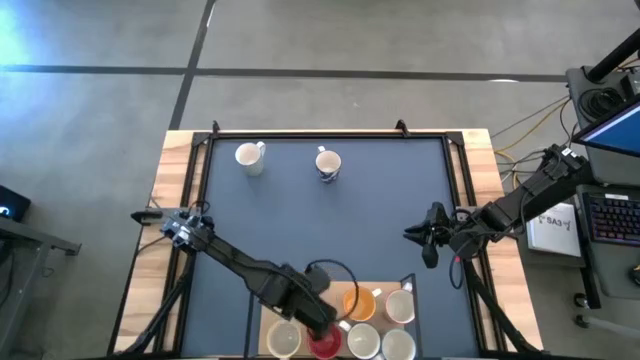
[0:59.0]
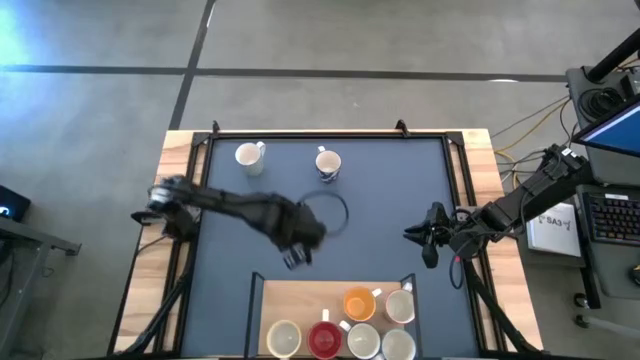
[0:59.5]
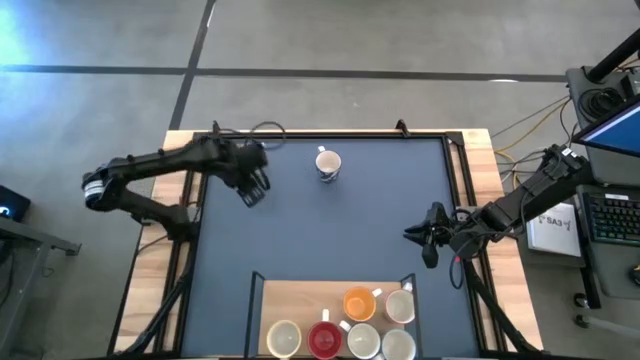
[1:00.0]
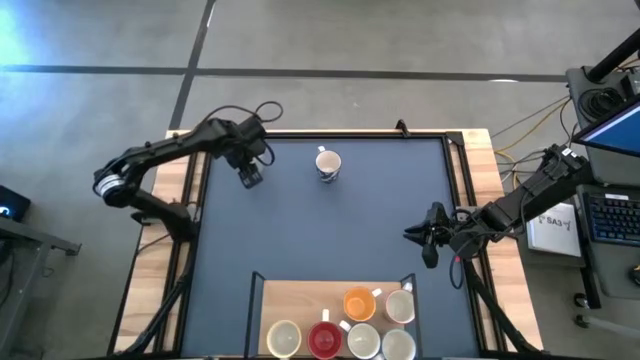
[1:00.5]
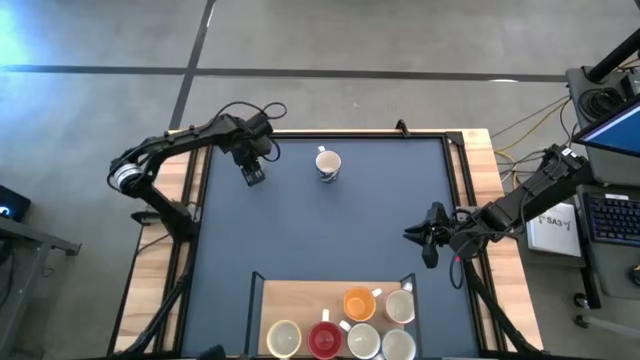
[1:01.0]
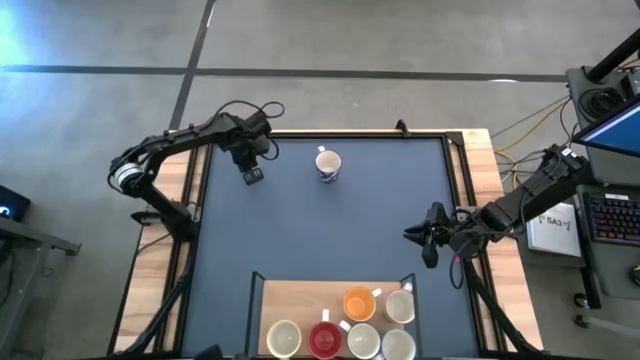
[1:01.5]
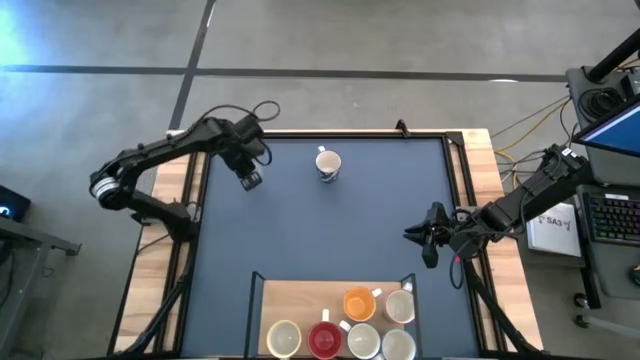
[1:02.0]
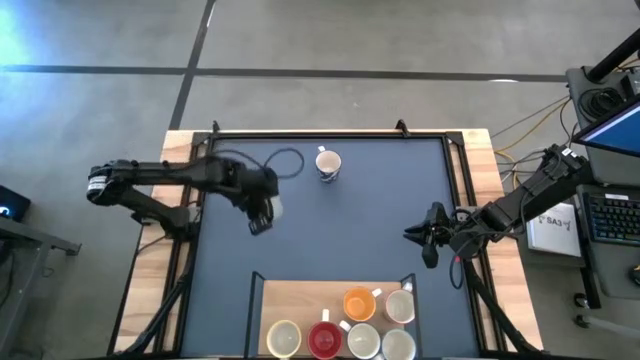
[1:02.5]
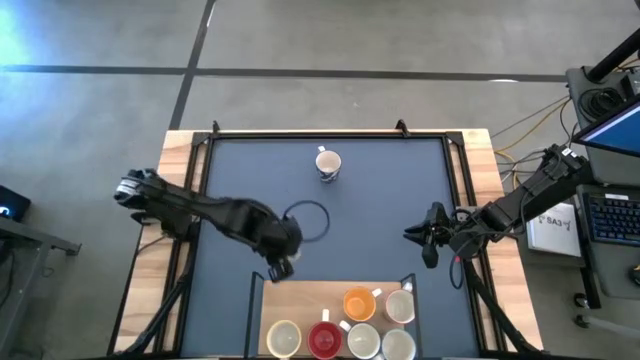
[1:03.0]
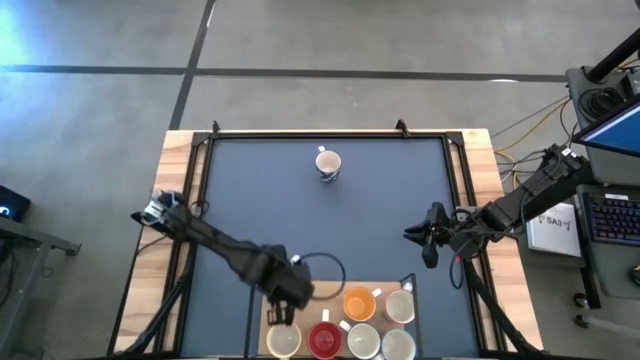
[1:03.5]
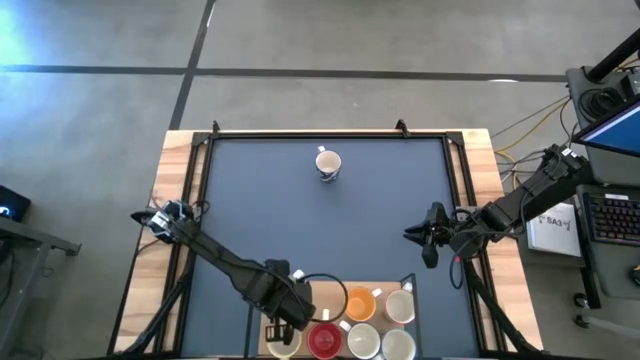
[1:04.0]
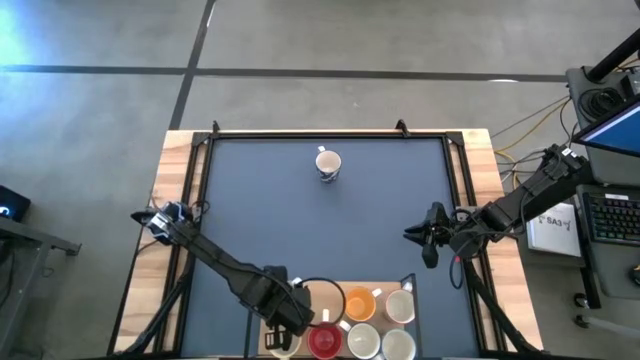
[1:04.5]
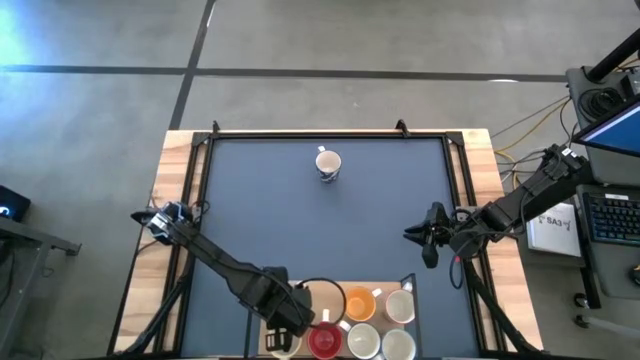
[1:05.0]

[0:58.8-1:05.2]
Task: Place coffee mugs
Put the green patterned mug on the shelf

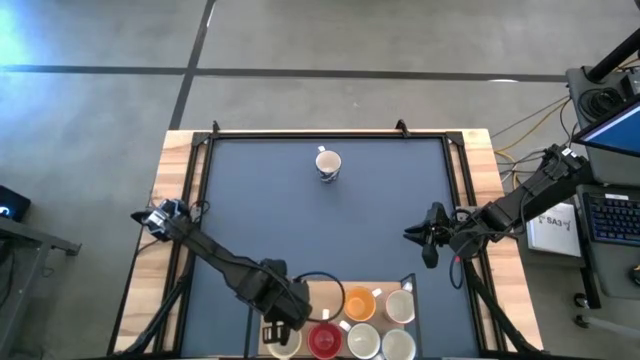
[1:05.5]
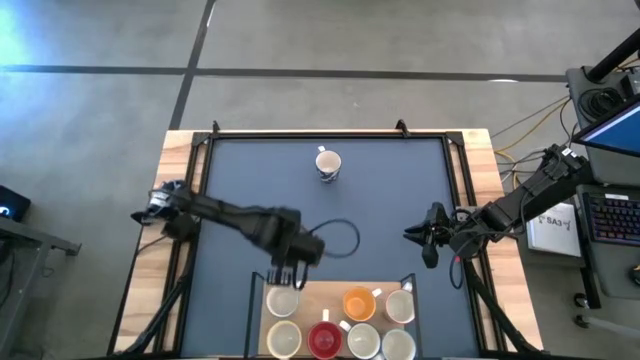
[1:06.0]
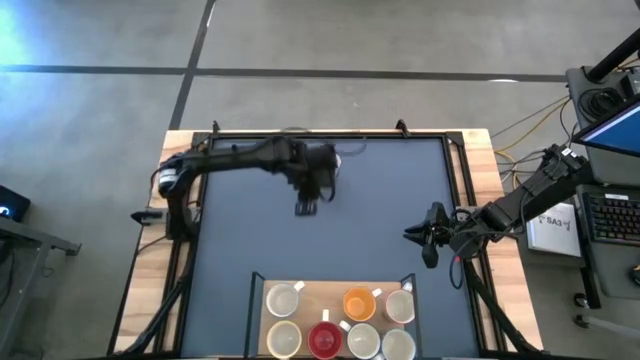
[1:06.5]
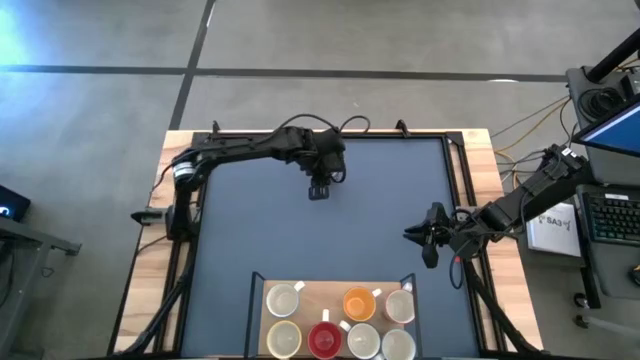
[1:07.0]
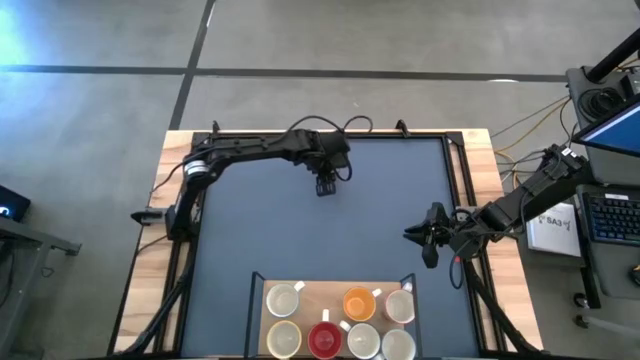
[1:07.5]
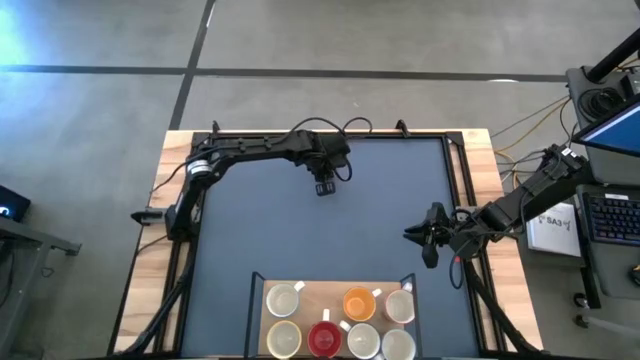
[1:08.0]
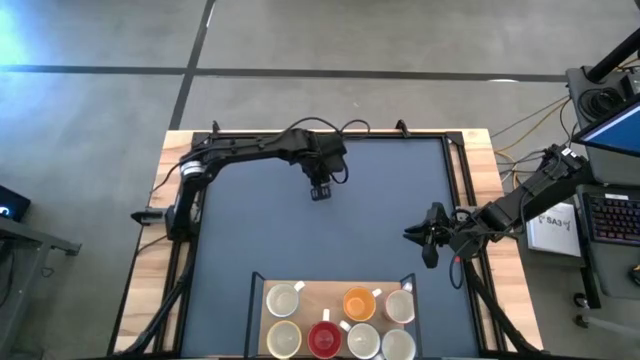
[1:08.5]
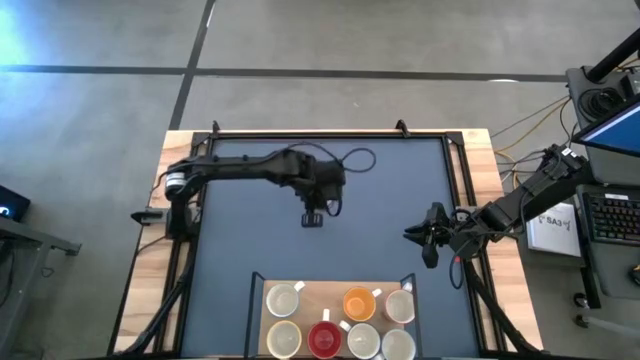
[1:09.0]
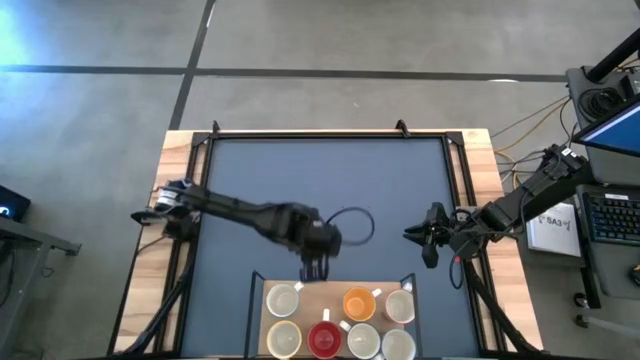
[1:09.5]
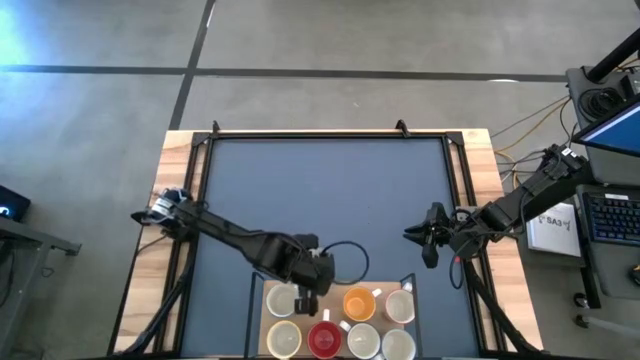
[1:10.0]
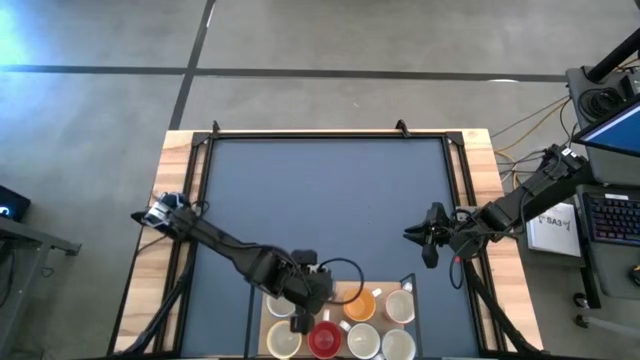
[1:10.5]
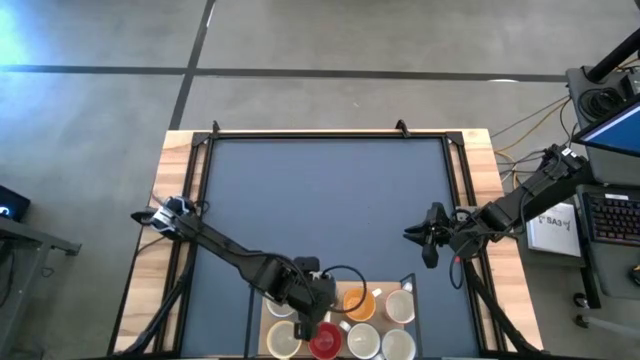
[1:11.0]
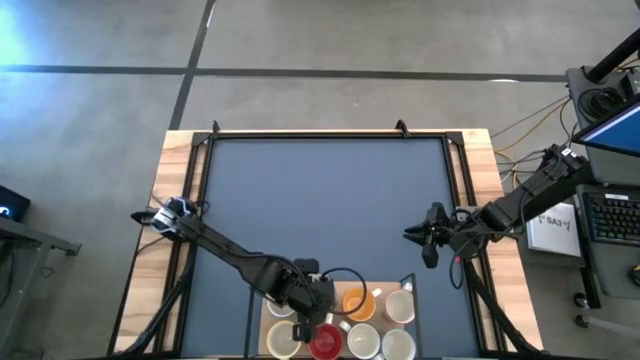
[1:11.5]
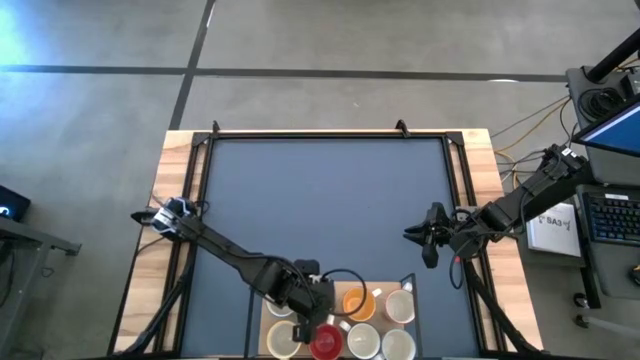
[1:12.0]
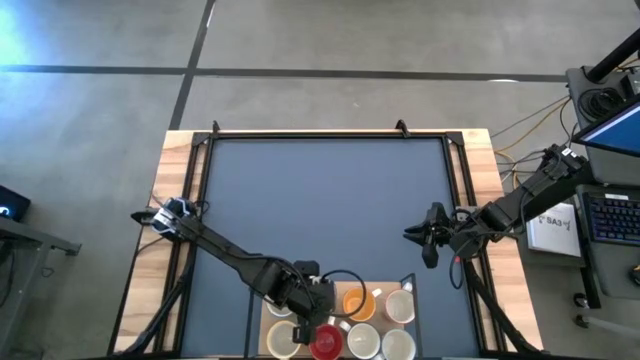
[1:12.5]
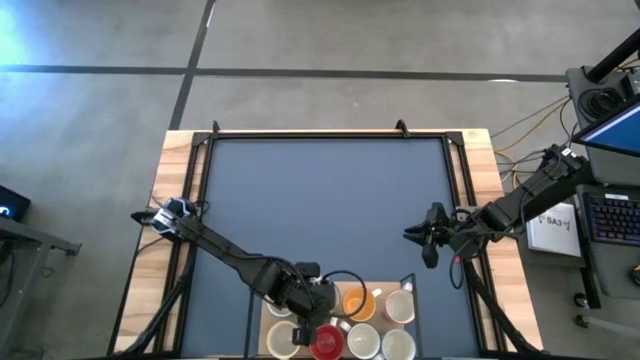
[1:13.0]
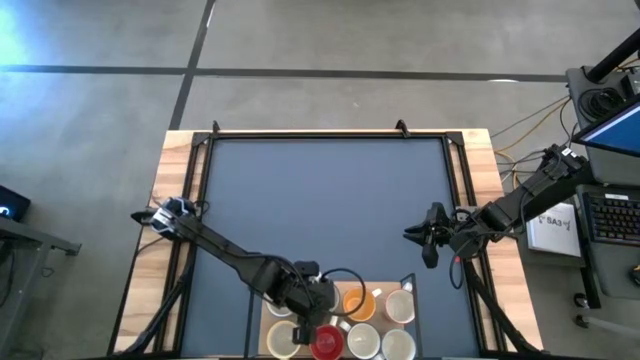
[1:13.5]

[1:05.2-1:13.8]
Put the blue patterned mug on the shelf

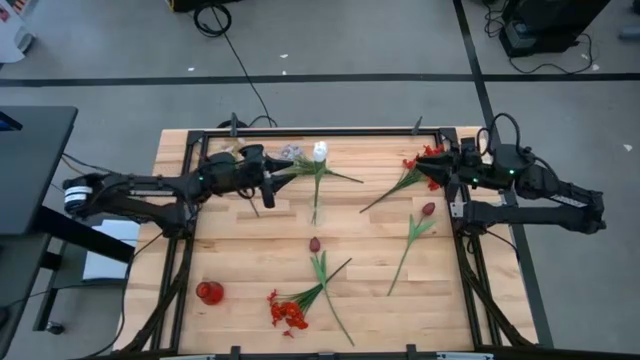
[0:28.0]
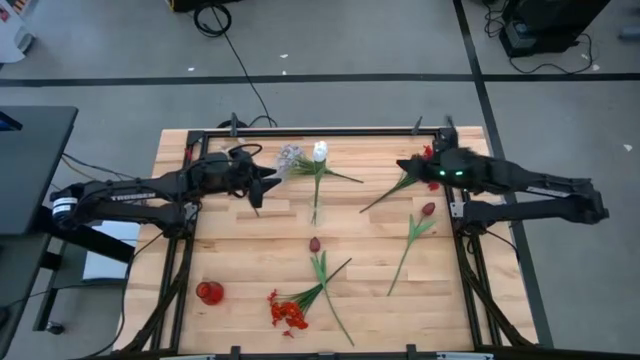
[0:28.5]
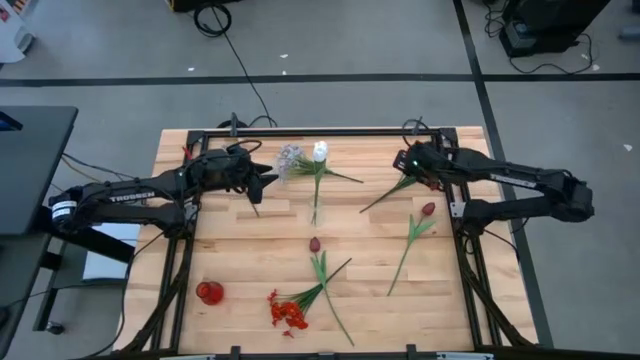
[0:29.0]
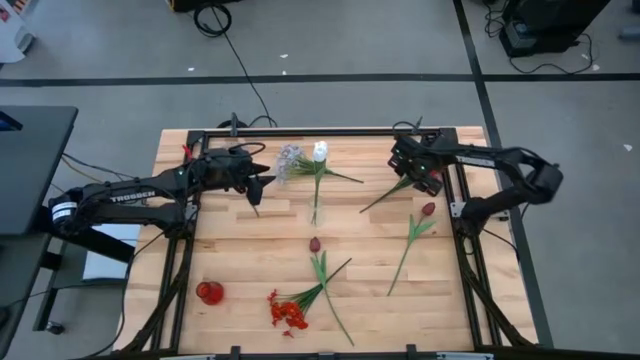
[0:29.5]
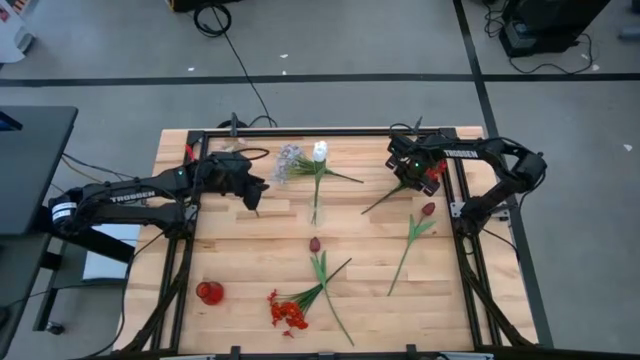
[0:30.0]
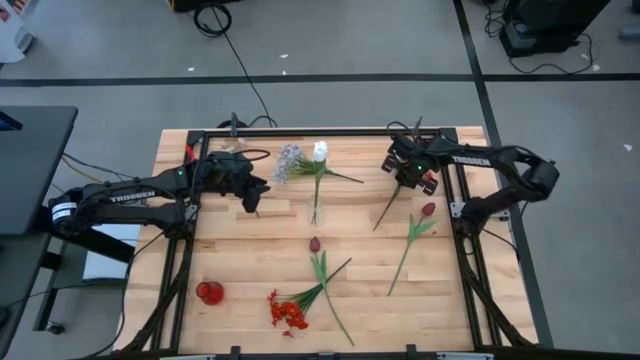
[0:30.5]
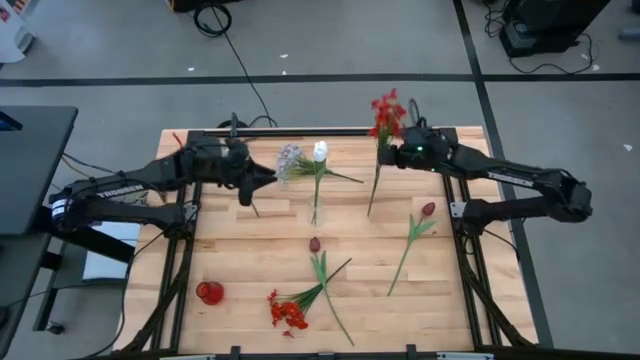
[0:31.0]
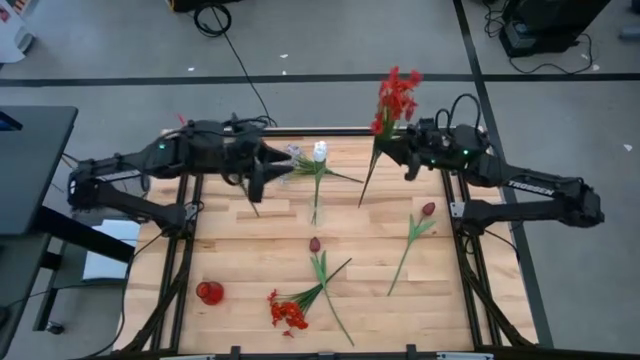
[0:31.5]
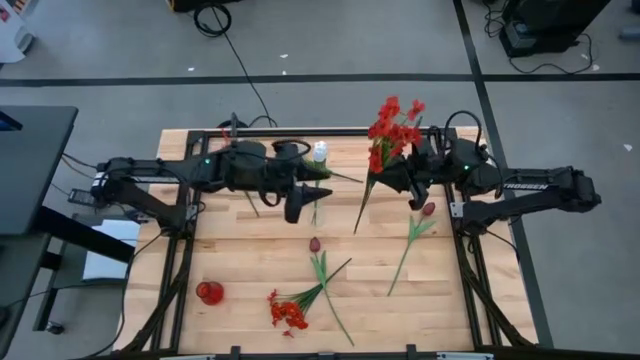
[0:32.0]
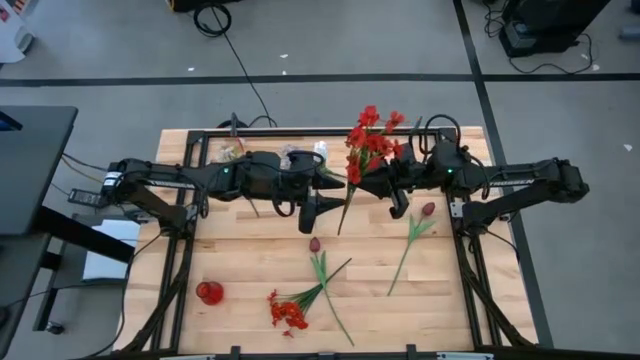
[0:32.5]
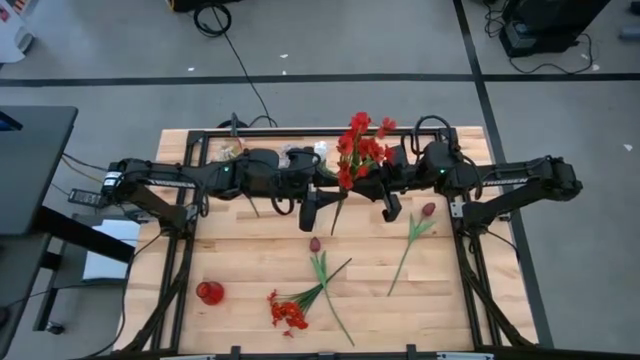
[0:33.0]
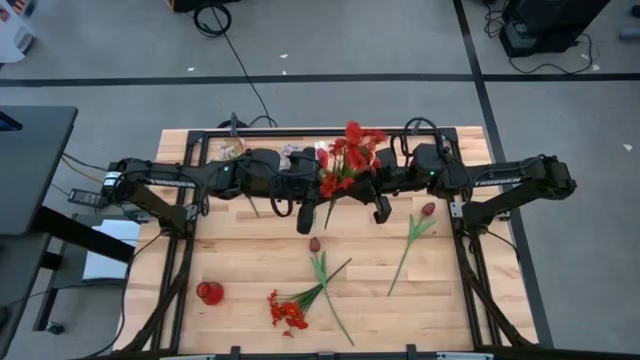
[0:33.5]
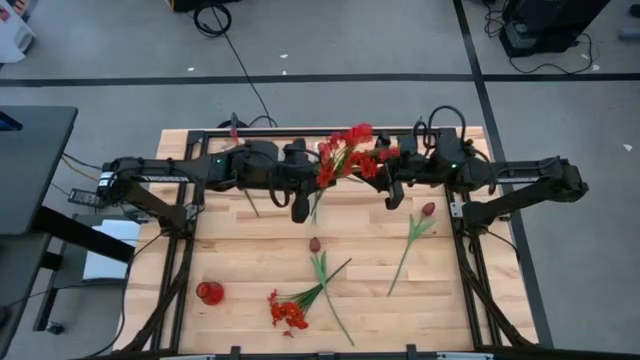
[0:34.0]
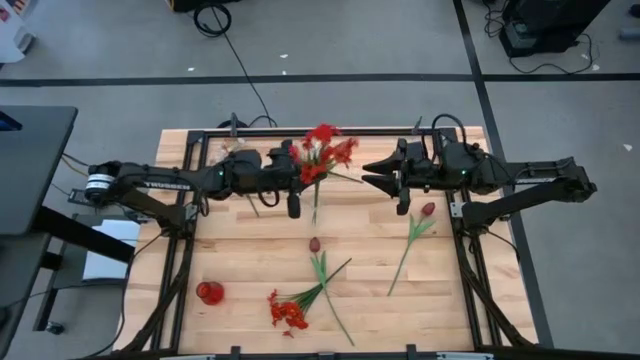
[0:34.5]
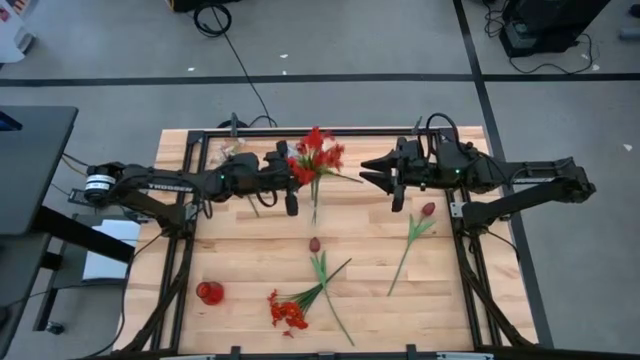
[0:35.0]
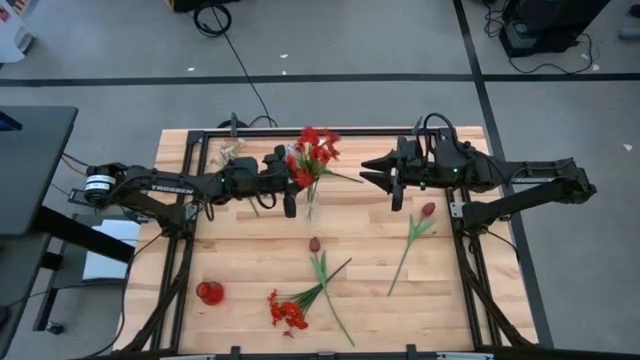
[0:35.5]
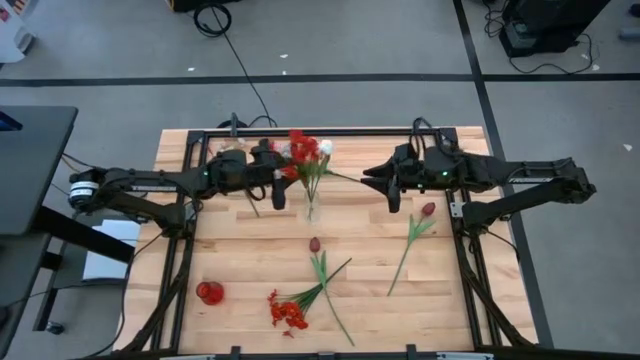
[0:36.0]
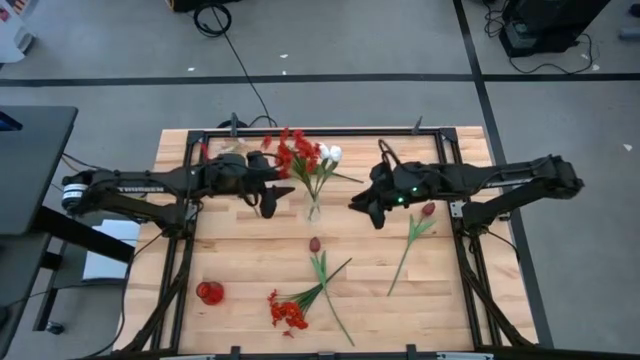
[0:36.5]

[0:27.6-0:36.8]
Task: Sort flowers into vase by color
Put the top orange flowers into the transparent vase
